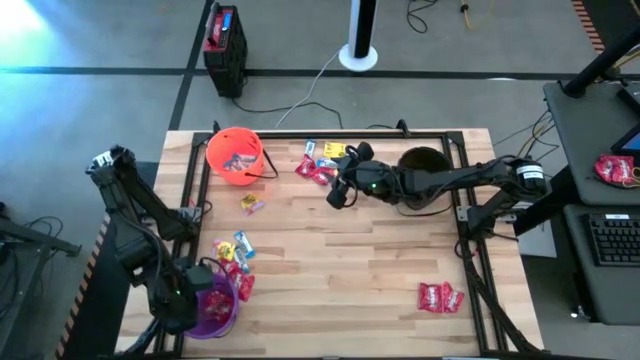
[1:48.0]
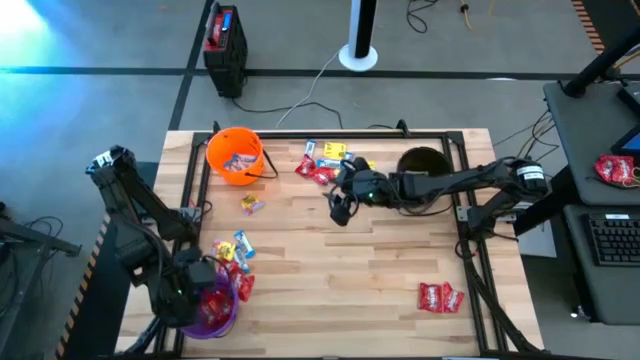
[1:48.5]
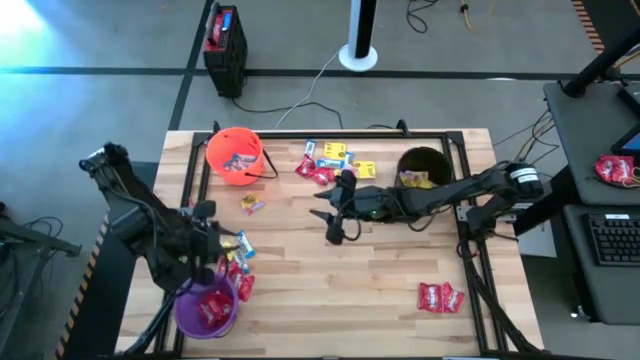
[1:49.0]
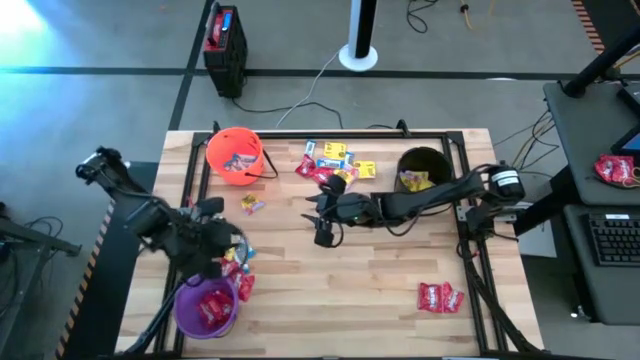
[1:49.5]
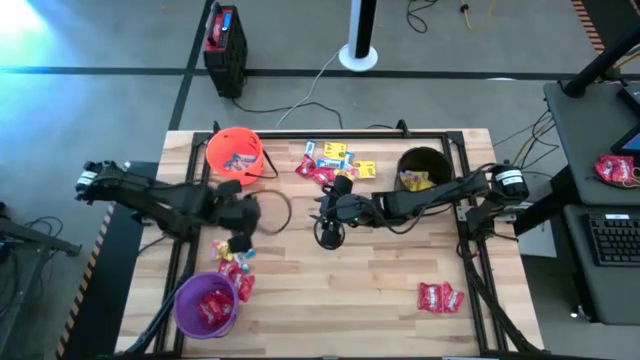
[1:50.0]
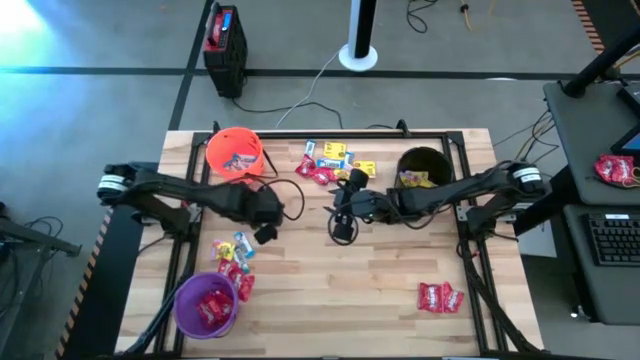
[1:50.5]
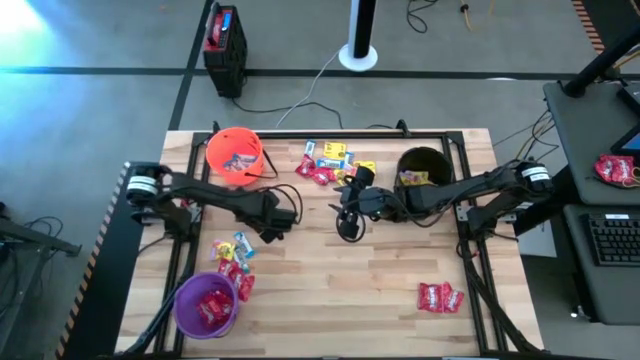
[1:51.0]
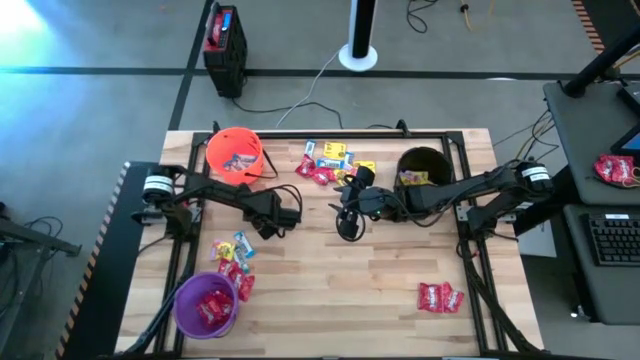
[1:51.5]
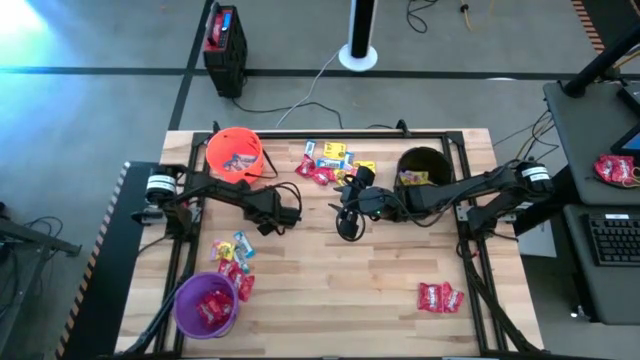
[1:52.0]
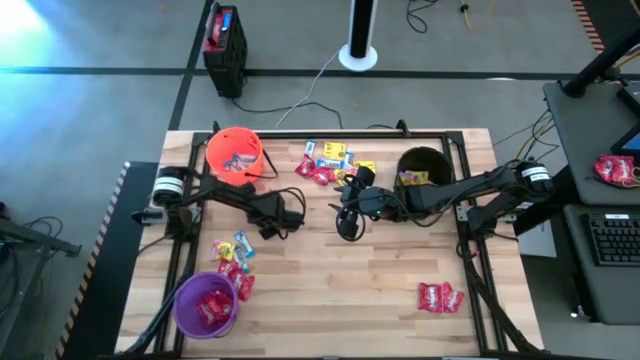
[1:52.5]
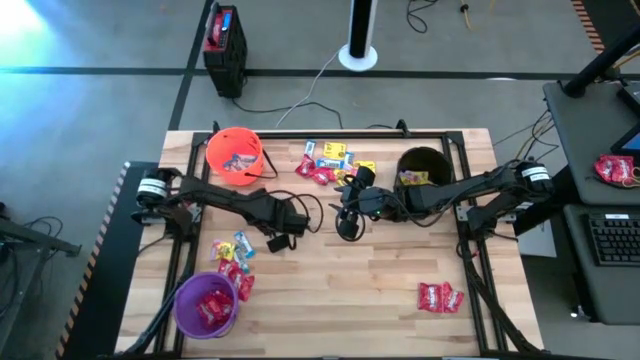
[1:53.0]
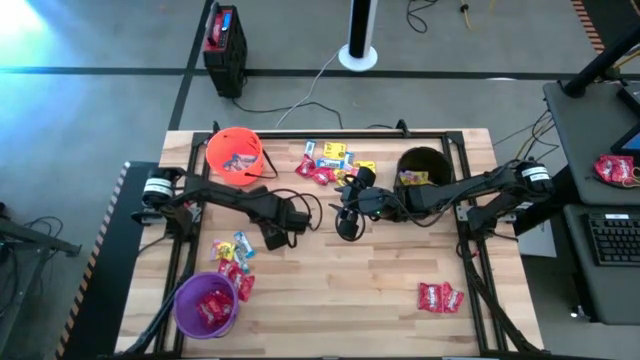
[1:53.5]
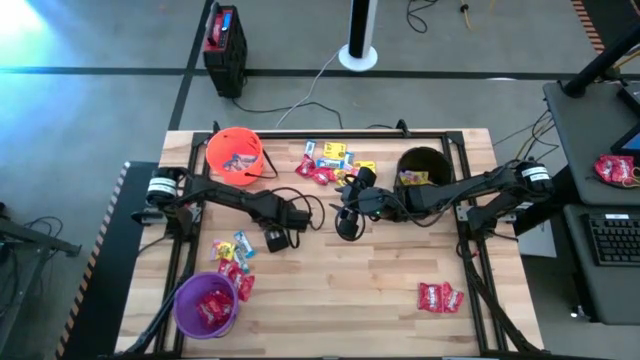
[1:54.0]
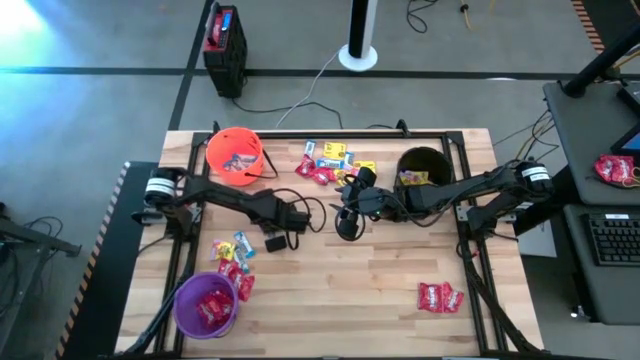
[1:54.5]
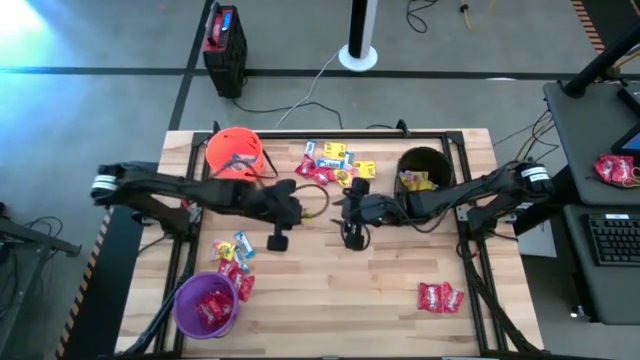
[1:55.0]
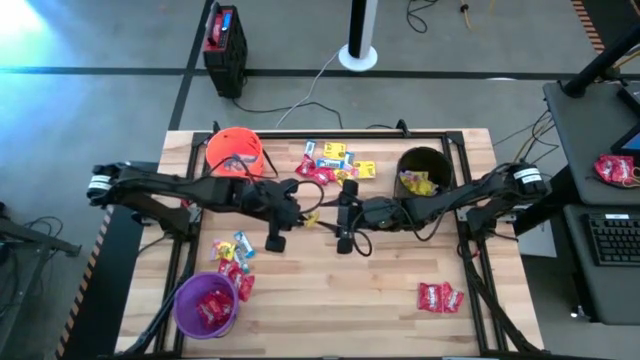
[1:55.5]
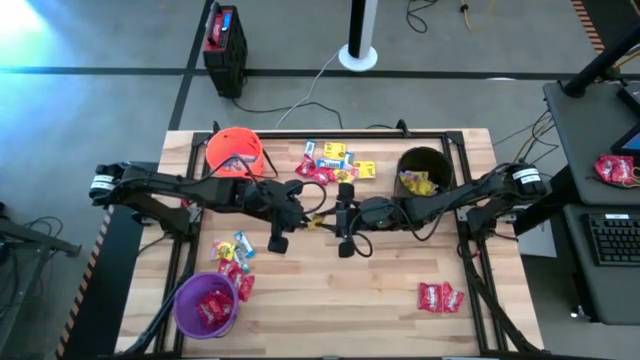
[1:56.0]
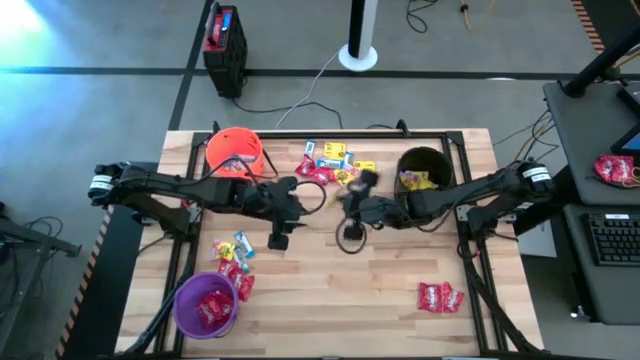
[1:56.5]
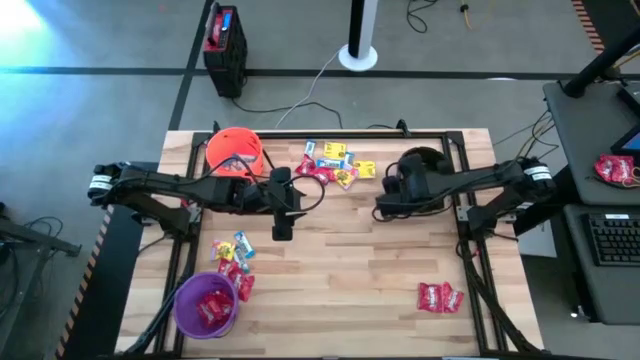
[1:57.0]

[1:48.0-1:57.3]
Task: Sort candy by brand, put in halloween buckets
Put the yellow candy into the black bucket

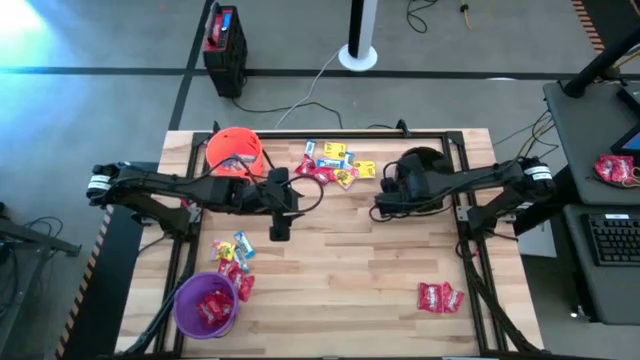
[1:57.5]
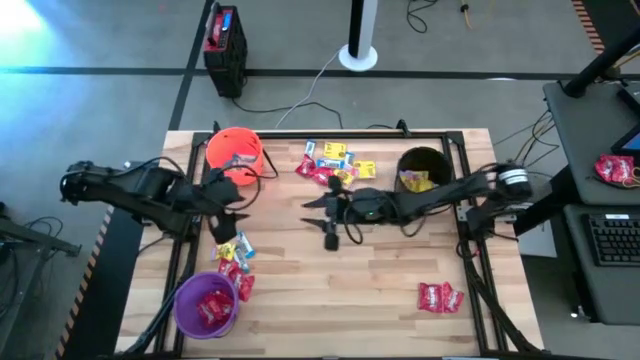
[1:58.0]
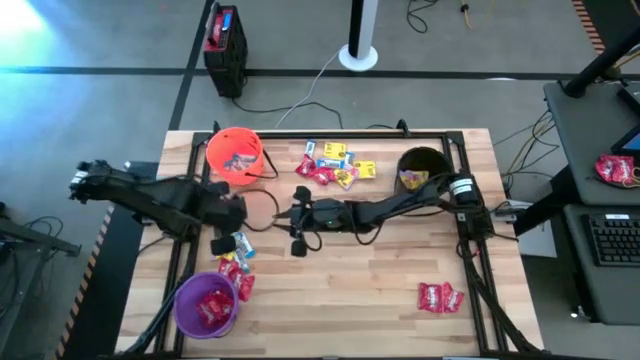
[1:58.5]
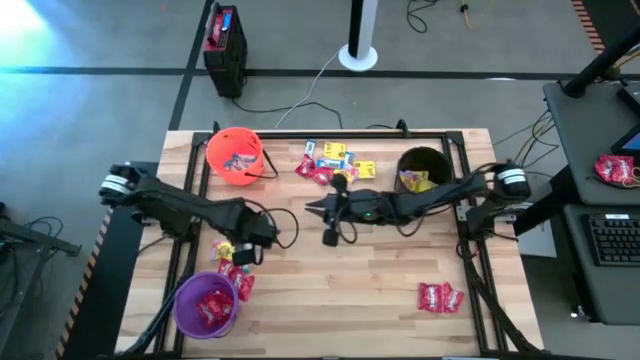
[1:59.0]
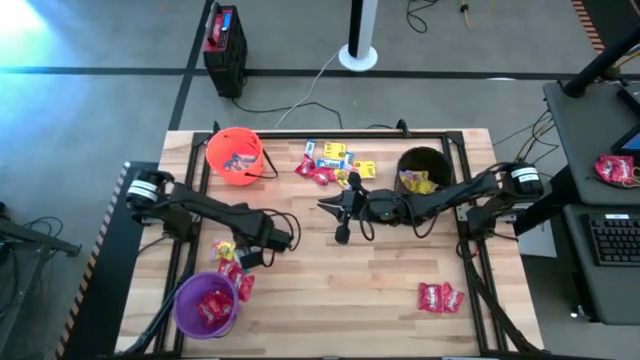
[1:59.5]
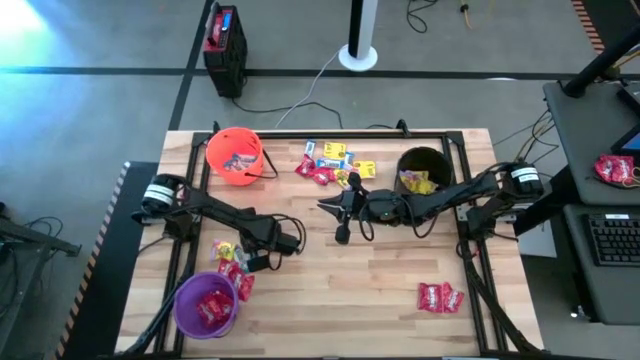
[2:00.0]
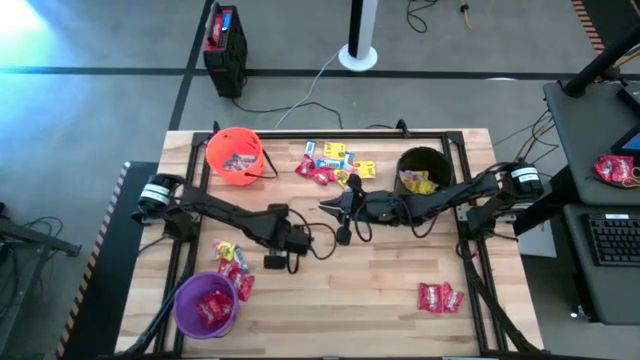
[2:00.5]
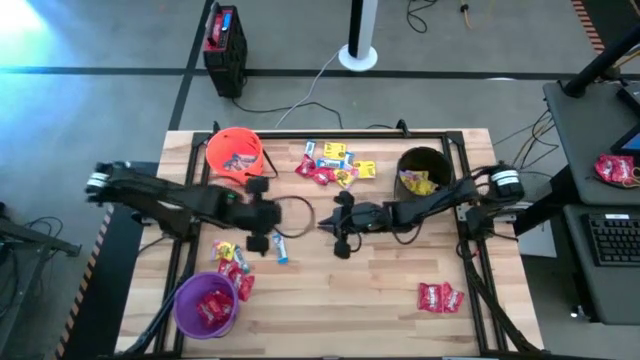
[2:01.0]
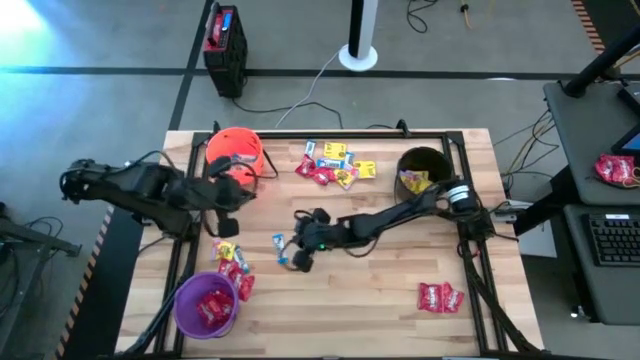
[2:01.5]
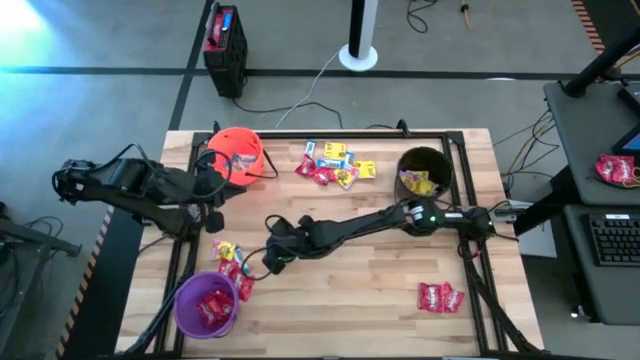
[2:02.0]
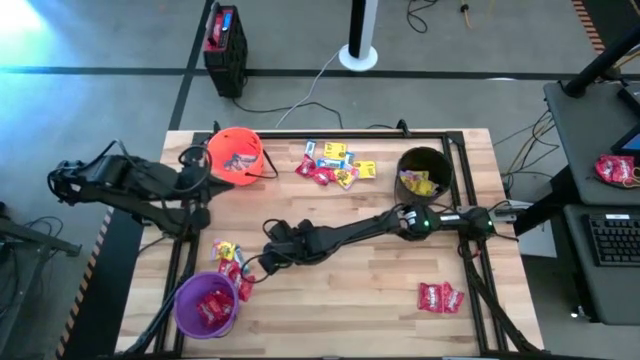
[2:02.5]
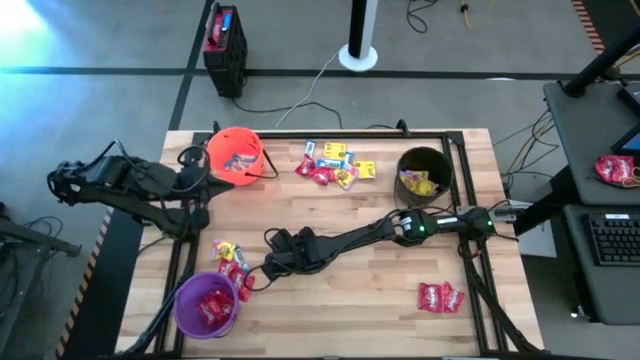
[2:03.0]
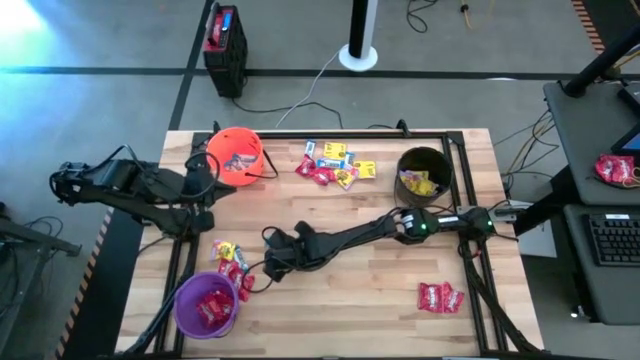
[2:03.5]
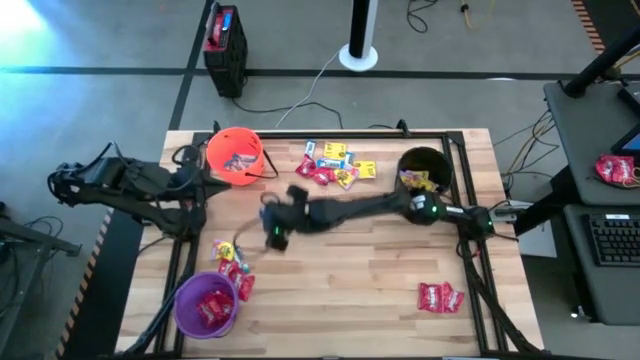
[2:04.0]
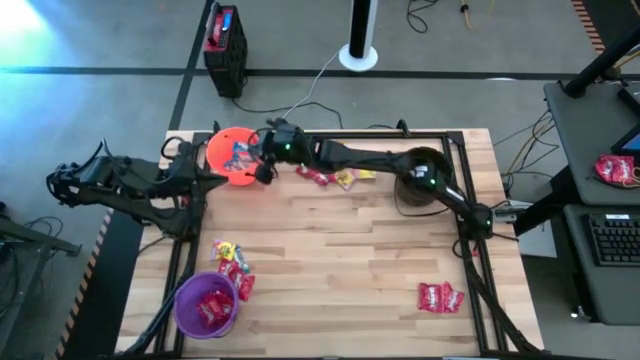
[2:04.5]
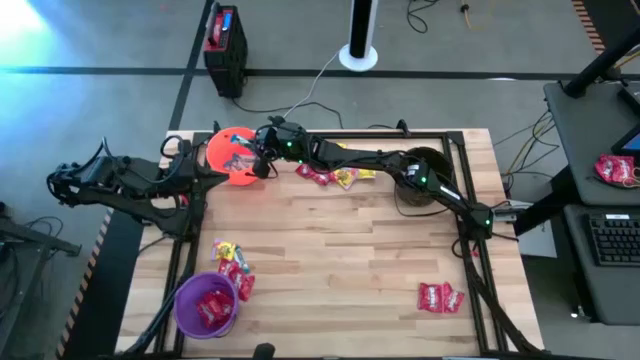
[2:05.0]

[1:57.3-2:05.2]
Put the white chocolate bar into the orange bucket

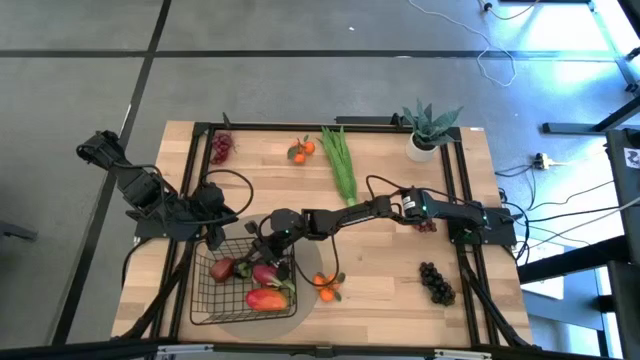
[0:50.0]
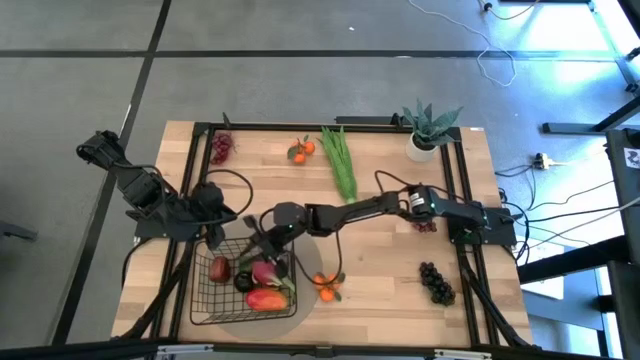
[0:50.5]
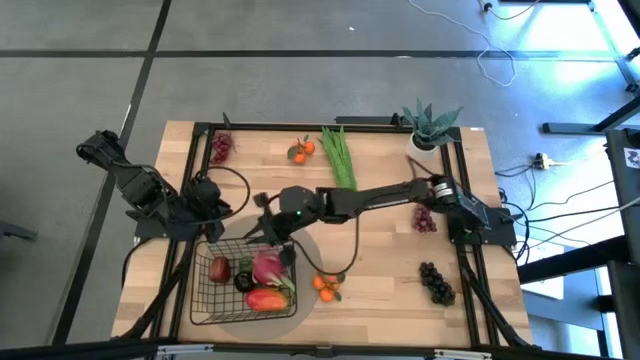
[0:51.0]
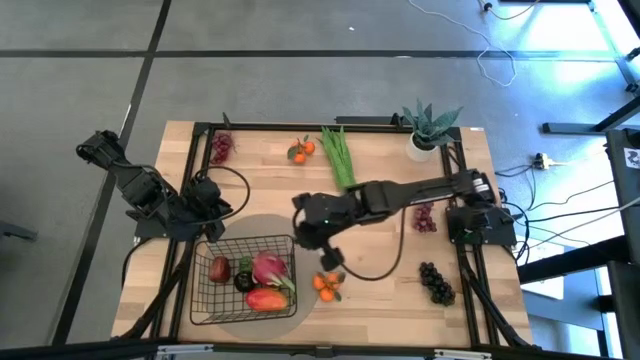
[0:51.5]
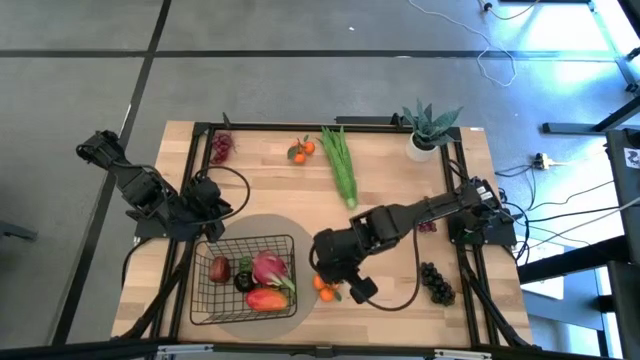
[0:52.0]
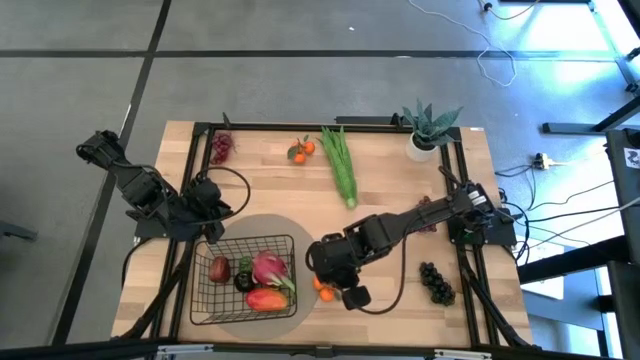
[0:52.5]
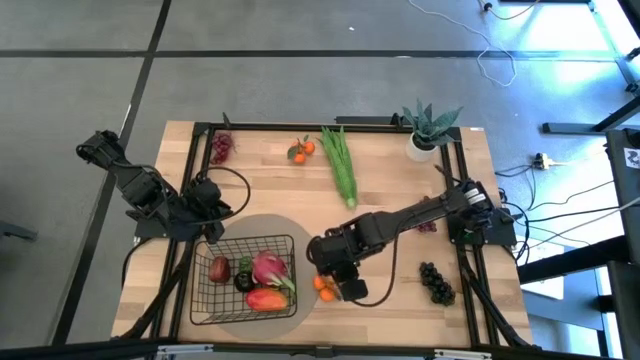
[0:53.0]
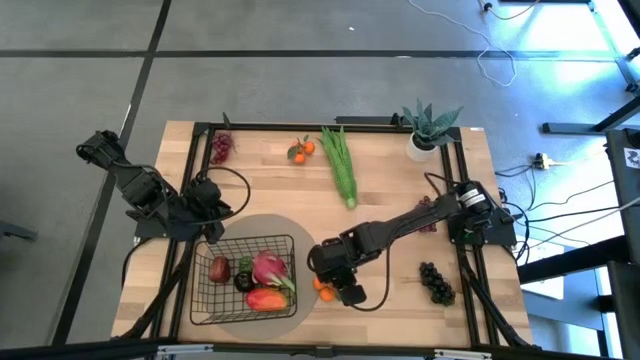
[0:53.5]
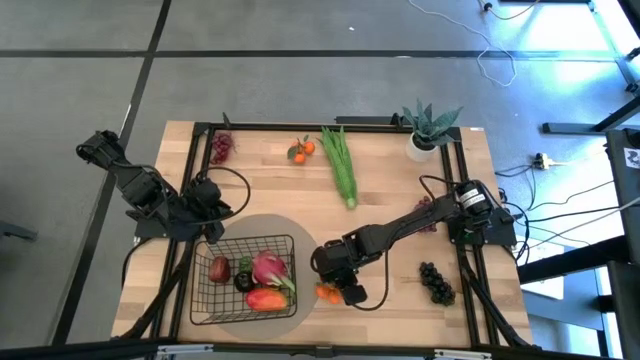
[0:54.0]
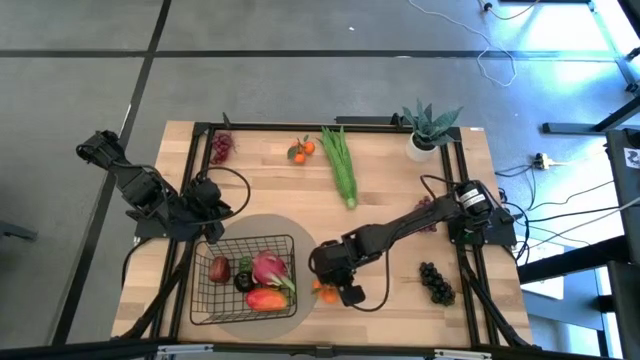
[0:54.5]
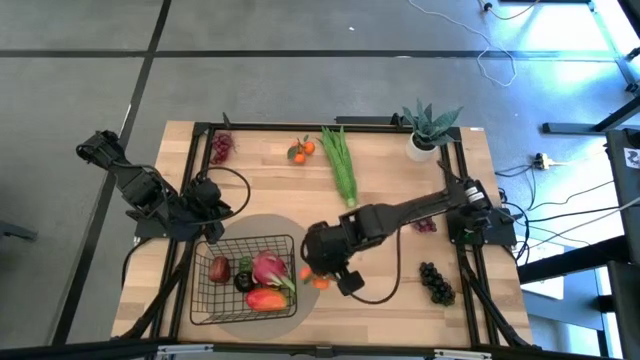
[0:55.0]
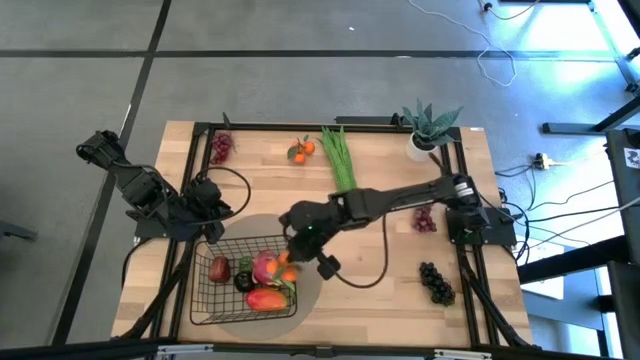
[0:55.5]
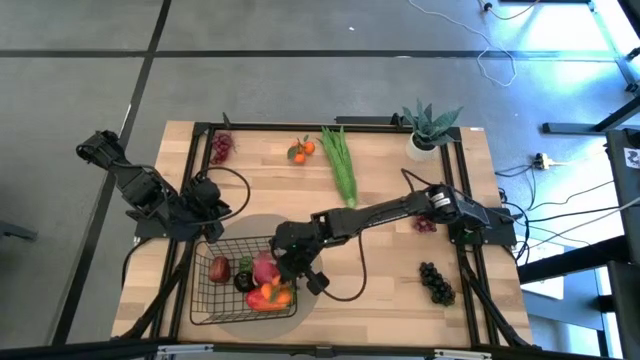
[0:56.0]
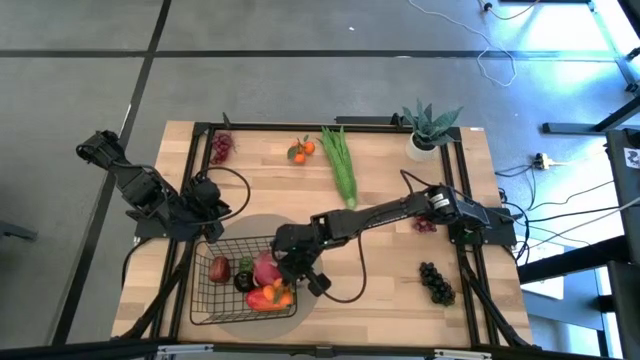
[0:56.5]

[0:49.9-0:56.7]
Task: Build produce basket
Put the bottom tangerine into the black wire basket
